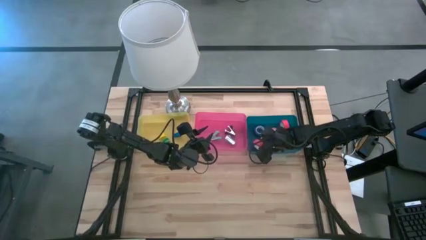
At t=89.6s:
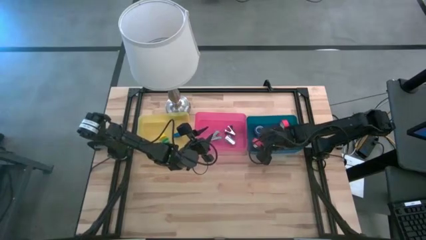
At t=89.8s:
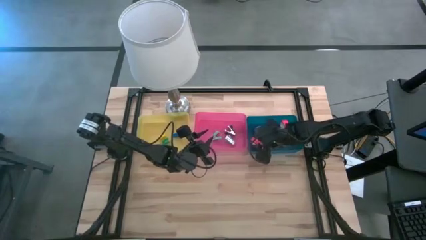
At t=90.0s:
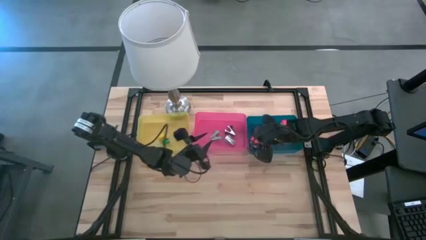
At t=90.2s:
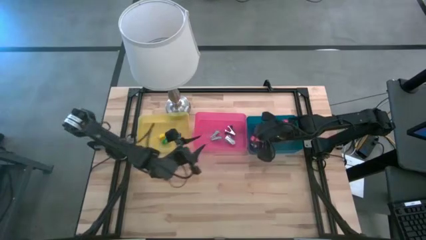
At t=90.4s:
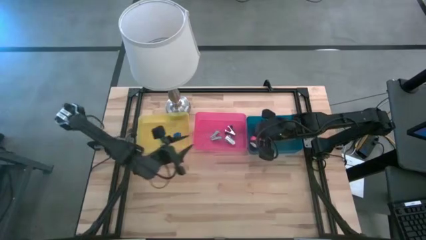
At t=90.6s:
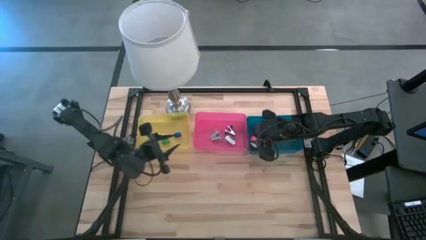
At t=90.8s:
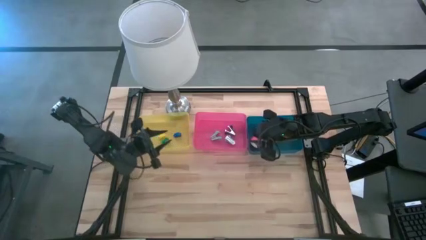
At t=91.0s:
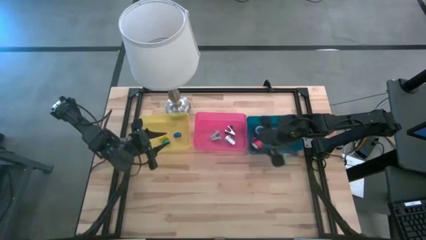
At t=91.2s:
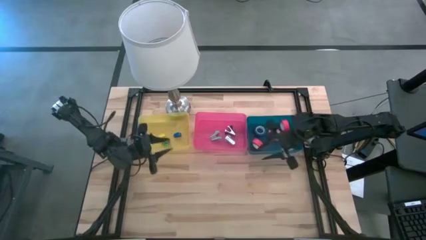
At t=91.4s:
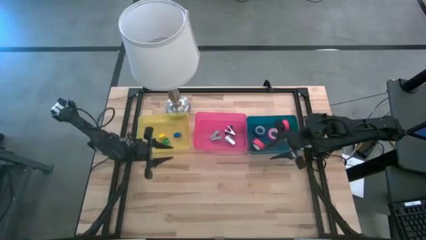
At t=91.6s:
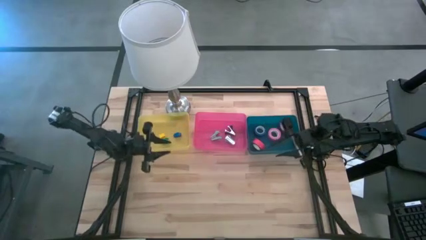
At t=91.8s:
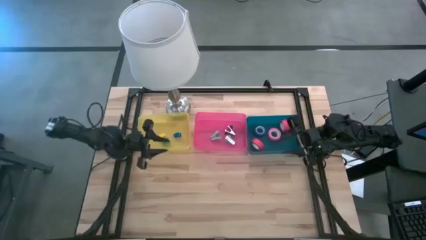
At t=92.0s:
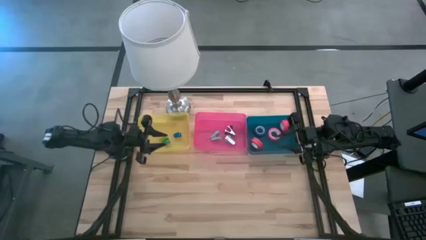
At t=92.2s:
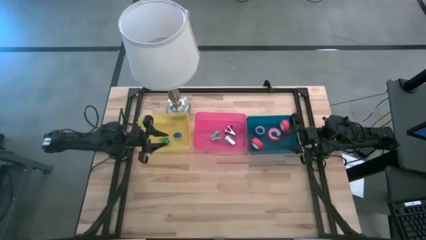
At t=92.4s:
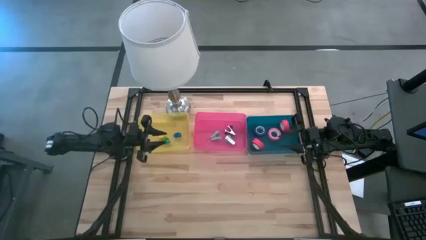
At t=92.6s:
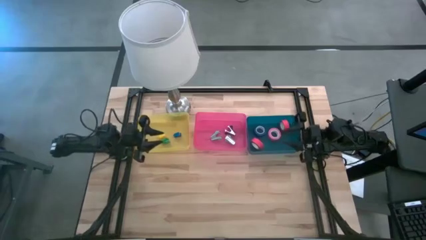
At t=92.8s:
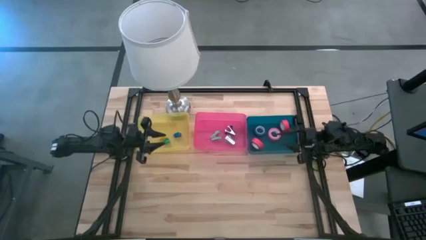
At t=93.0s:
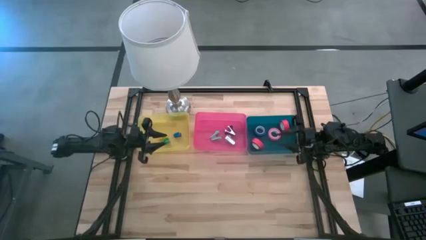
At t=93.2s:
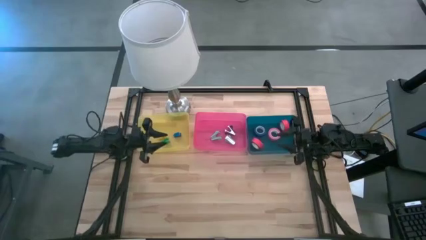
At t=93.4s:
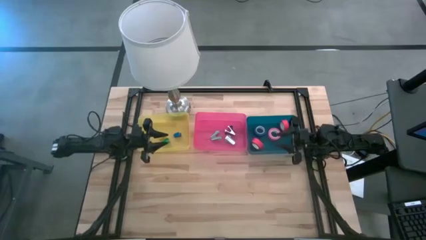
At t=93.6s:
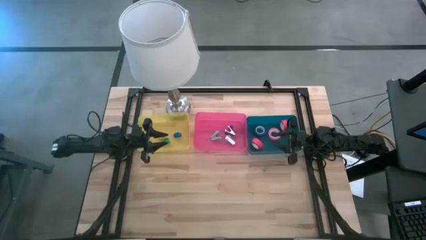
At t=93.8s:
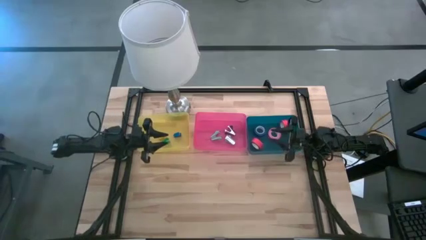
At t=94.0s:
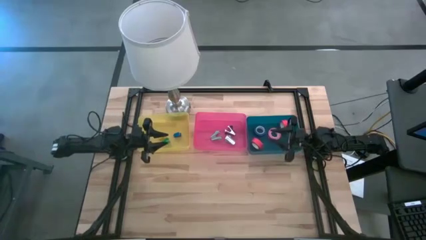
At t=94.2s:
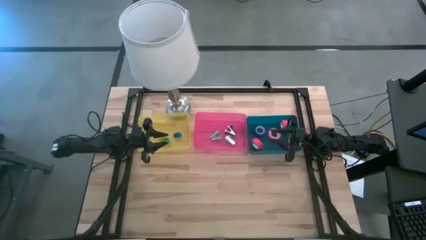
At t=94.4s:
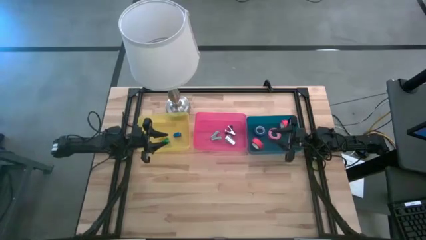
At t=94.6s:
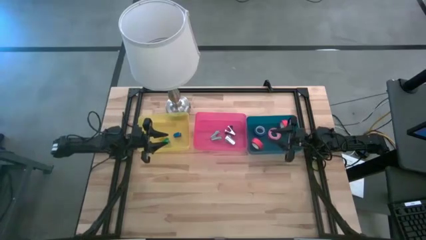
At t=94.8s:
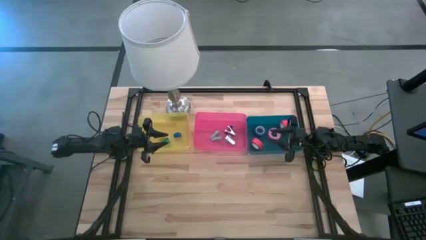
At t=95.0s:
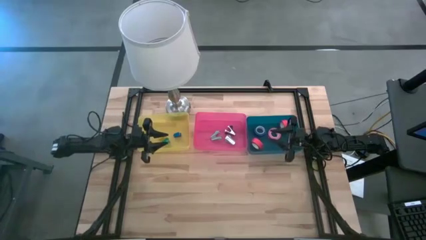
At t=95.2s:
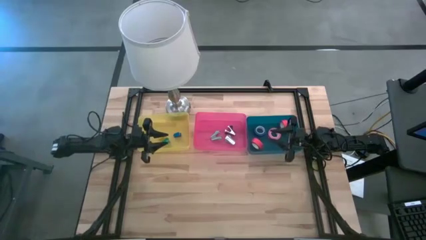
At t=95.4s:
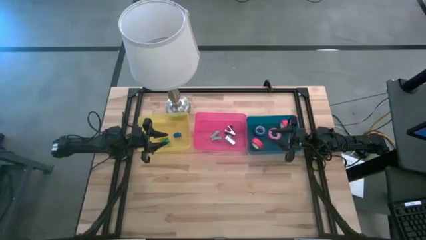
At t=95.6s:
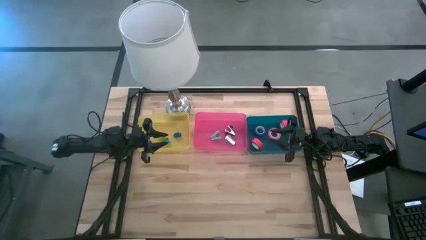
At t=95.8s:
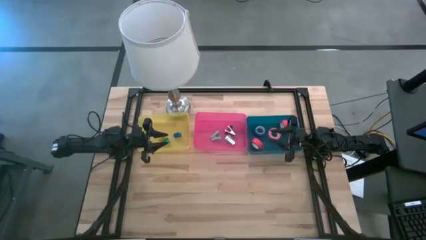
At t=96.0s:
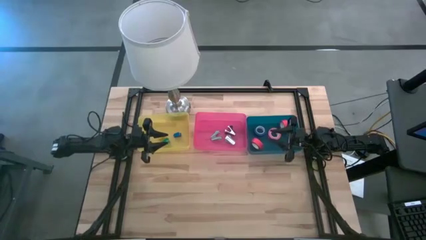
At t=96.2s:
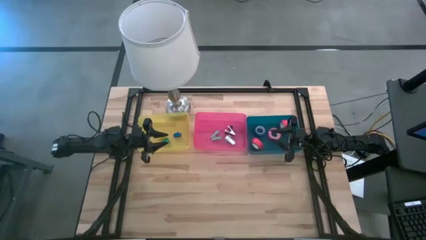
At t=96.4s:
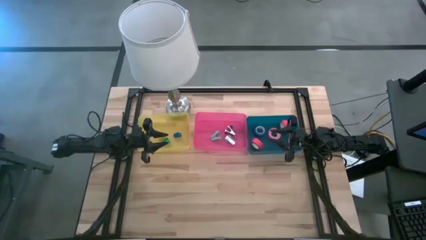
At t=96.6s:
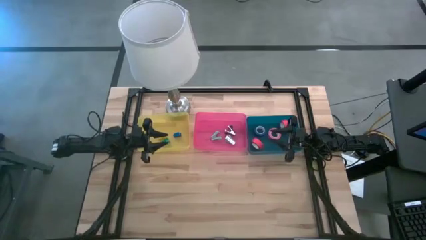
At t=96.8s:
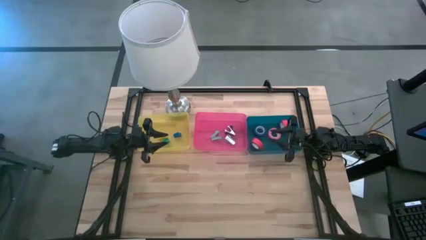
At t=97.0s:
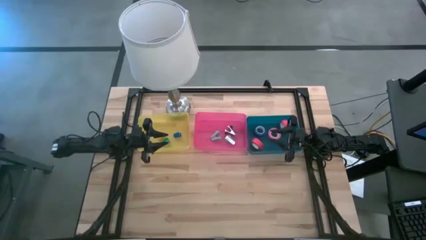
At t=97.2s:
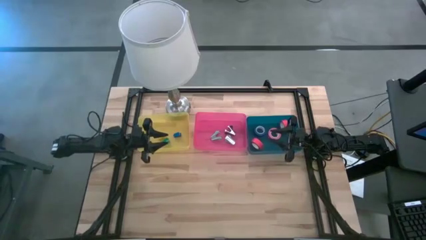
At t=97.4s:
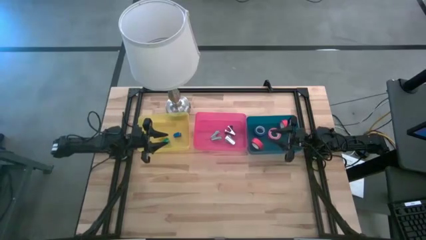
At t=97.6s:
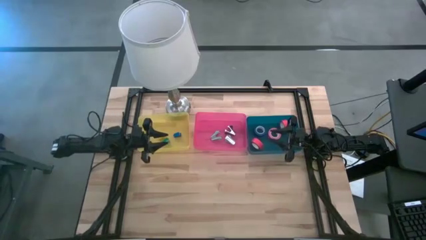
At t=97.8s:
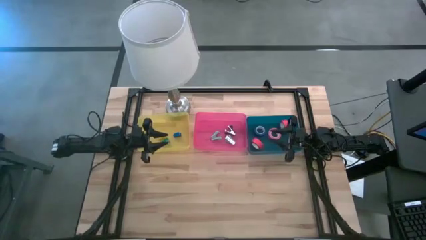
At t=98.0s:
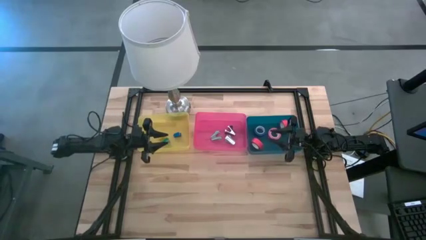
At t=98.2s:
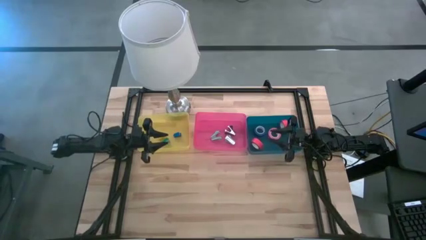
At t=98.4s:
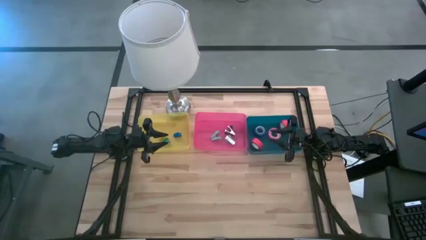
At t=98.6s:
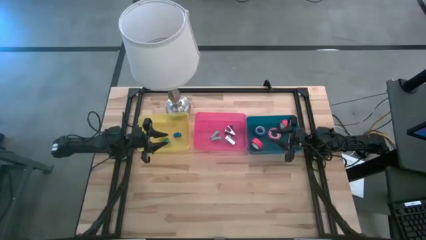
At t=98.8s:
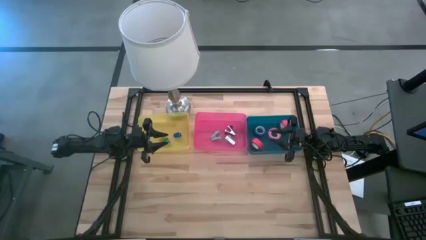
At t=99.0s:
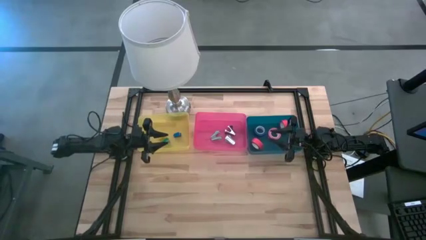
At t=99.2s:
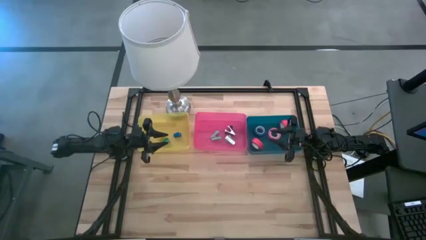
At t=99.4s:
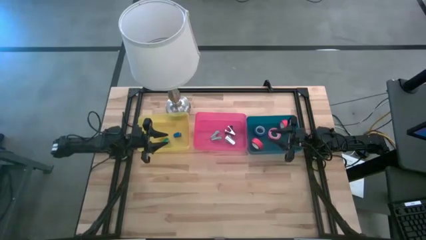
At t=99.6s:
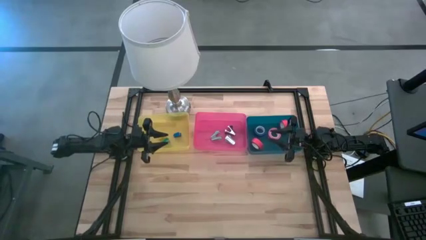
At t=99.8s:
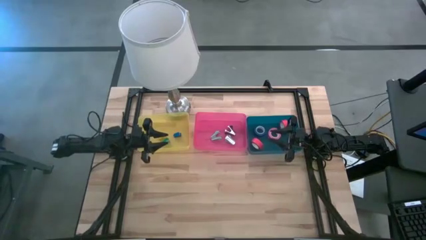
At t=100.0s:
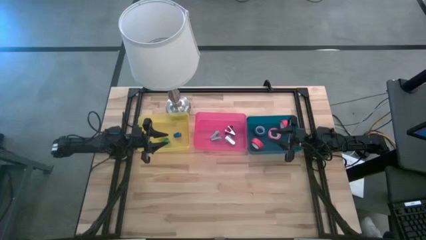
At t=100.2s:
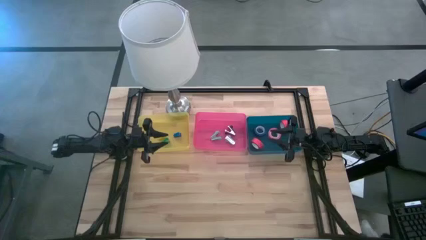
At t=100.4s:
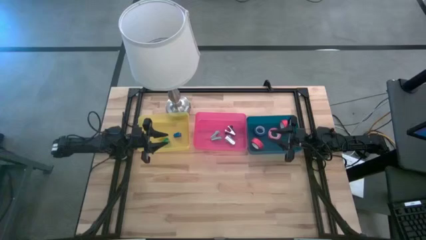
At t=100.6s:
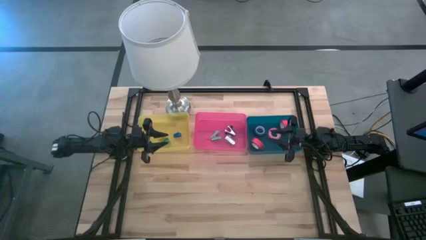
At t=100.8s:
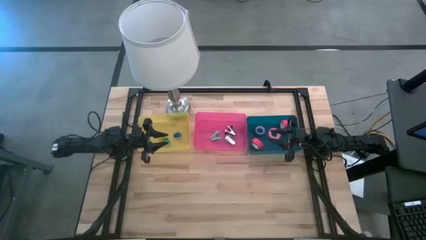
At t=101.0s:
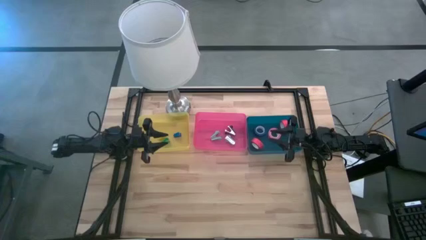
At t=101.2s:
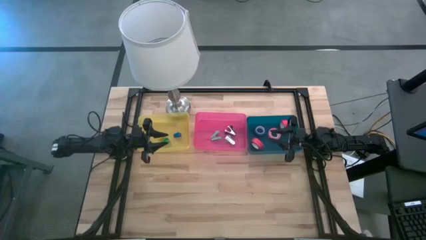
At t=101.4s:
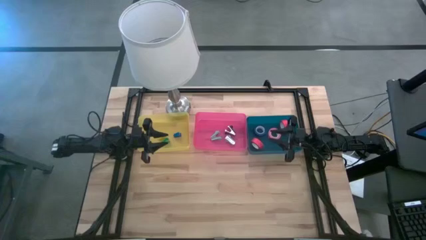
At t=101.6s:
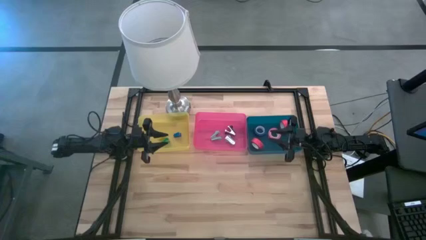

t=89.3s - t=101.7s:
Task: Pick and place Stapler, Stapler remover, tape
Return to Home Position

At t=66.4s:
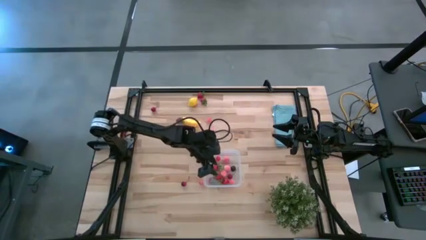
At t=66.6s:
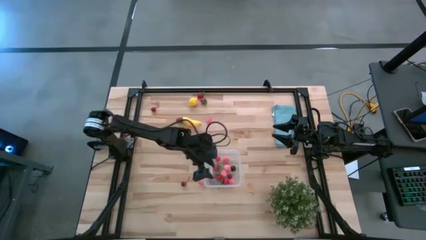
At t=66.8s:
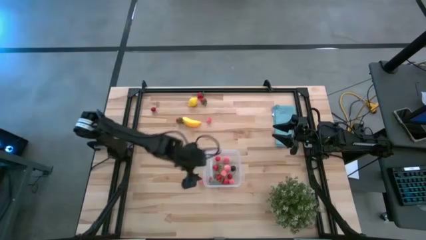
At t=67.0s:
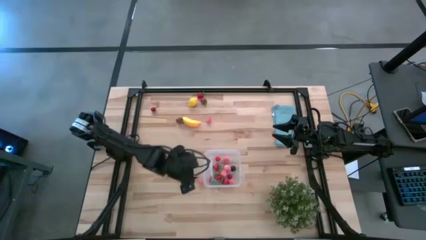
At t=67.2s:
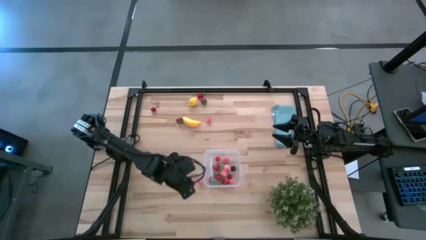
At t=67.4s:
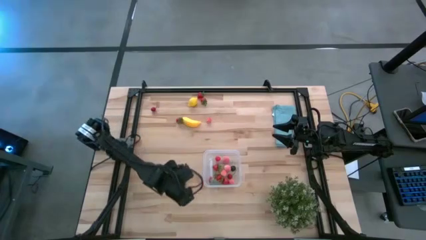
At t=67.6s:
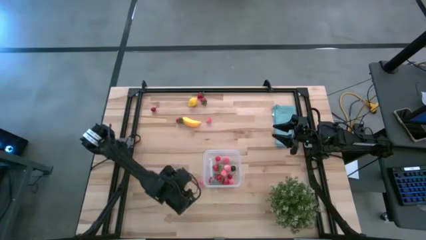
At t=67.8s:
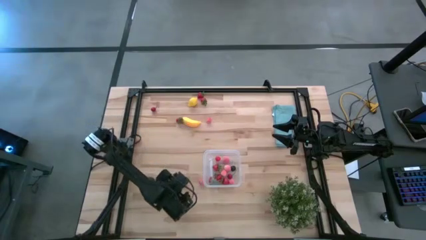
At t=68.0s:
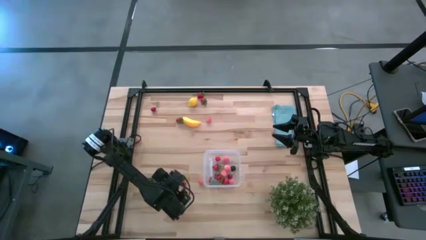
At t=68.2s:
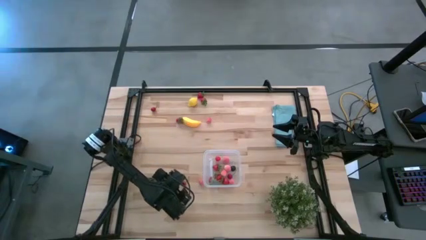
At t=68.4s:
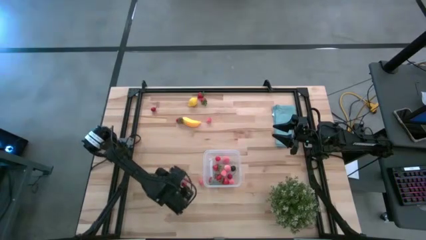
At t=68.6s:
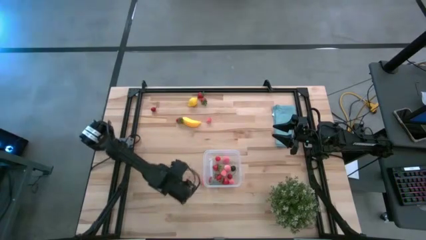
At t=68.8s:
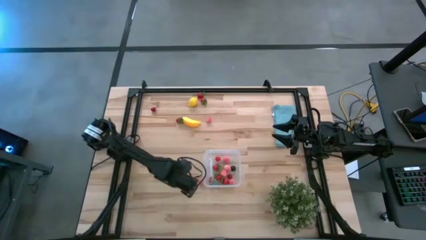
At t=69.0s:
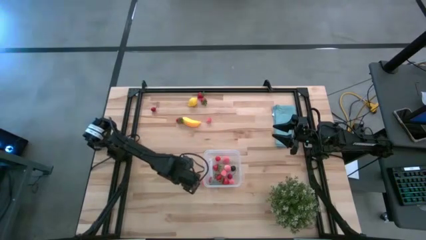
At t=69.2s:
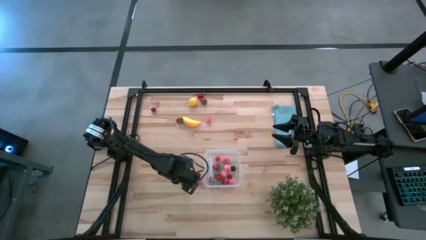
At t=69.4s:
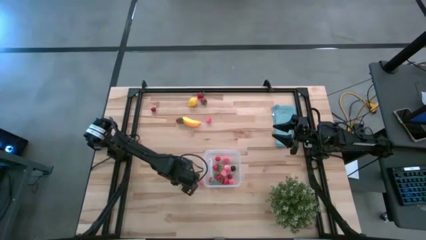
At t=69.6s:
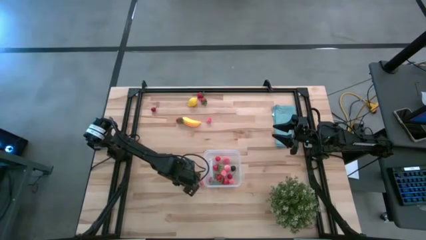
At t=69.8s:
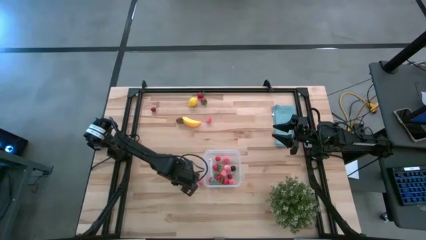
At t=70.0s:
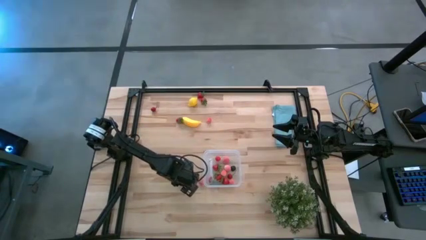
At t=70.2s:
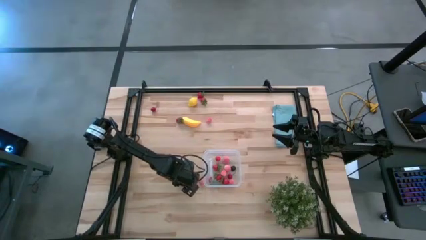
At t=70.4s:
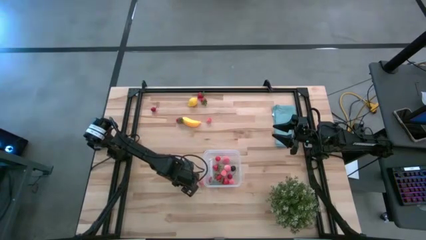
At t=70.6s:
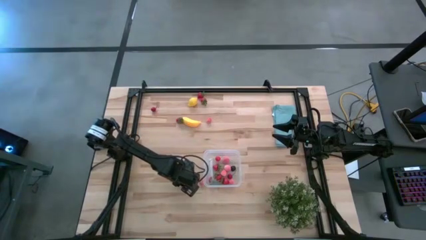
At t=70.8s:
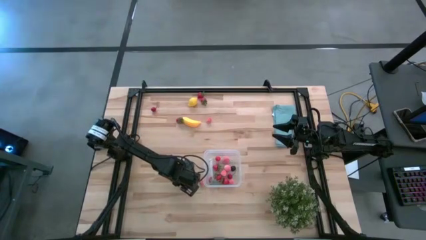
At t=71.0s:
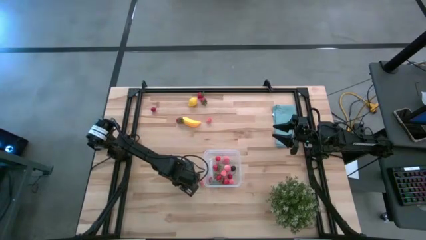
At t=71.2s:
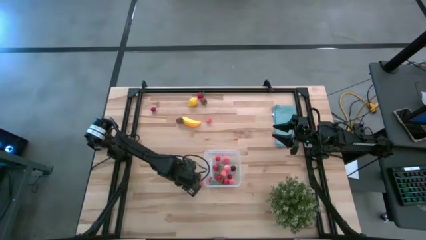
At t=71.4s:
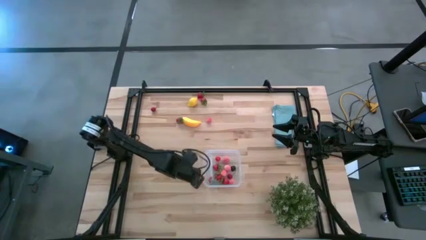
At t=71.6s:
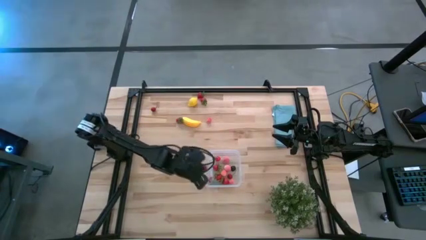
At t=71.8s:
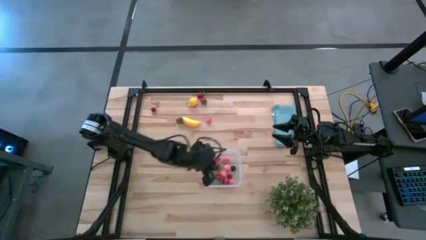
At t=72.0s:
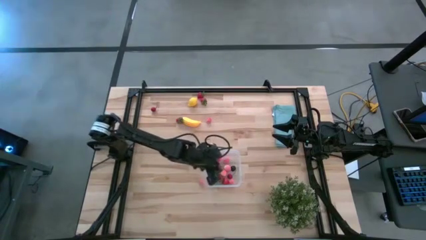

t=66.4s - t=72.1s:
Task: Pick and placing Produce into tupperware
Put the dark red cherry into the transparent bin
